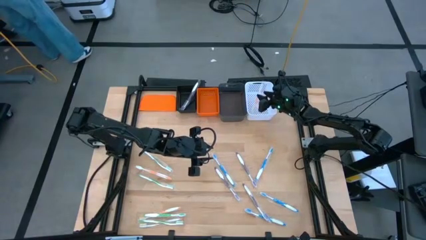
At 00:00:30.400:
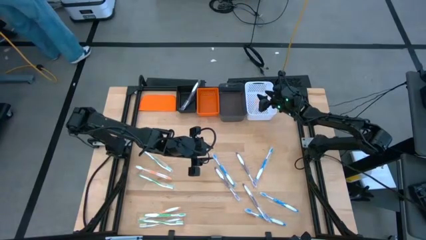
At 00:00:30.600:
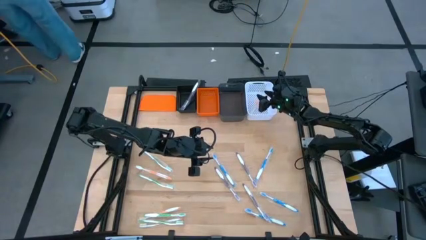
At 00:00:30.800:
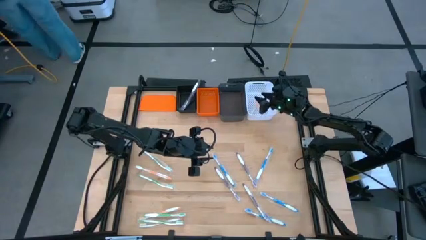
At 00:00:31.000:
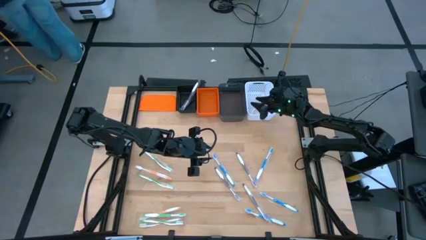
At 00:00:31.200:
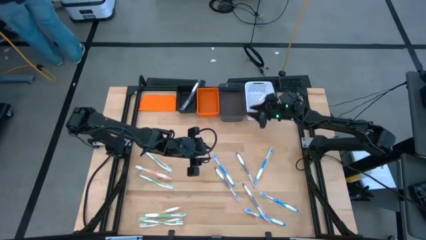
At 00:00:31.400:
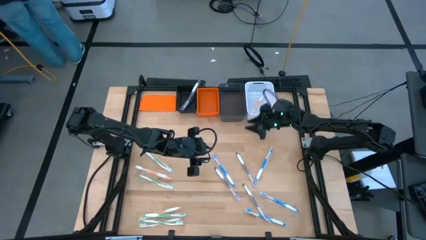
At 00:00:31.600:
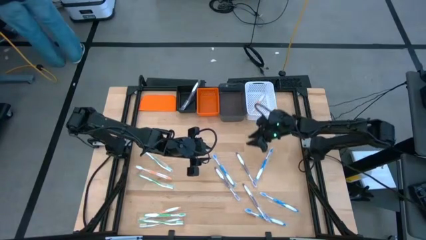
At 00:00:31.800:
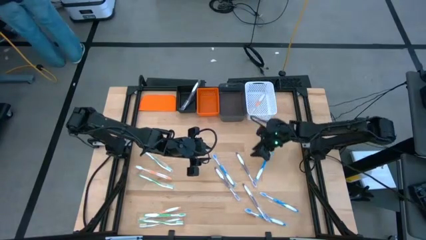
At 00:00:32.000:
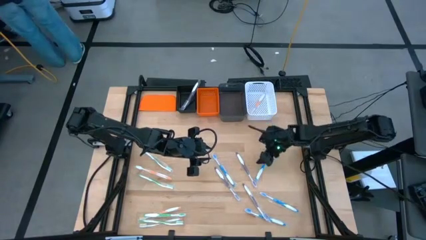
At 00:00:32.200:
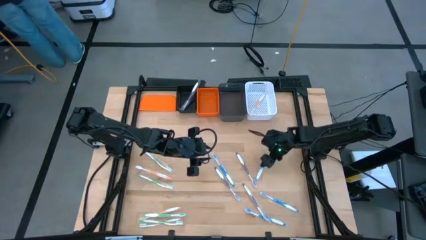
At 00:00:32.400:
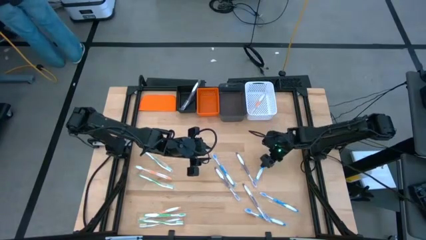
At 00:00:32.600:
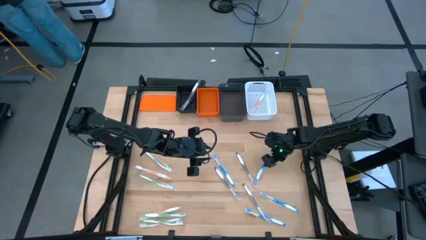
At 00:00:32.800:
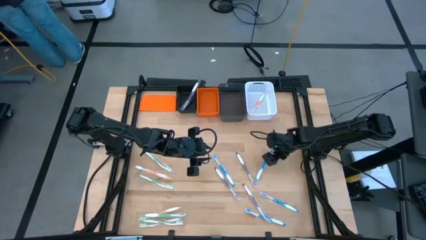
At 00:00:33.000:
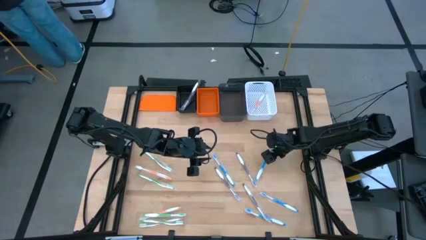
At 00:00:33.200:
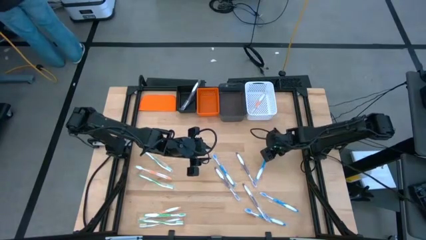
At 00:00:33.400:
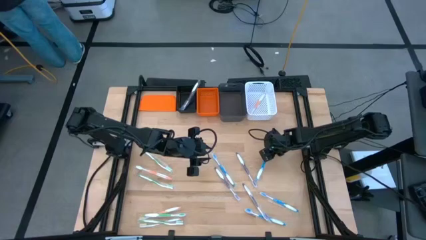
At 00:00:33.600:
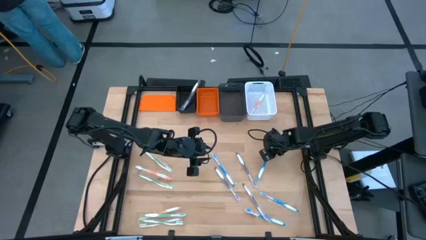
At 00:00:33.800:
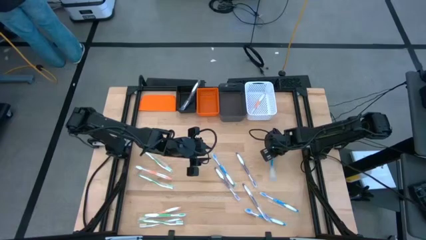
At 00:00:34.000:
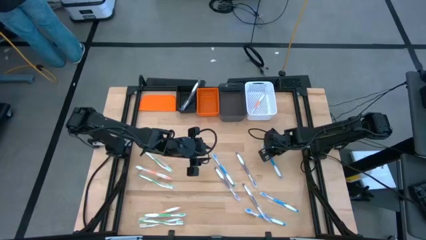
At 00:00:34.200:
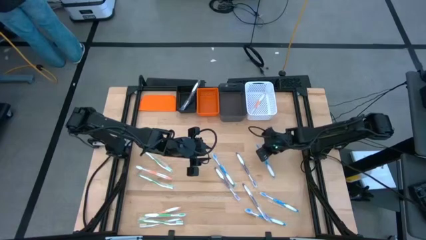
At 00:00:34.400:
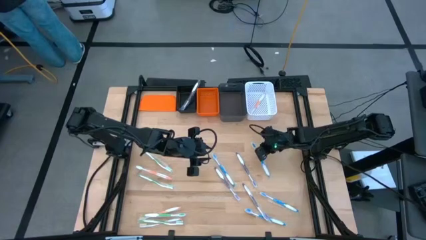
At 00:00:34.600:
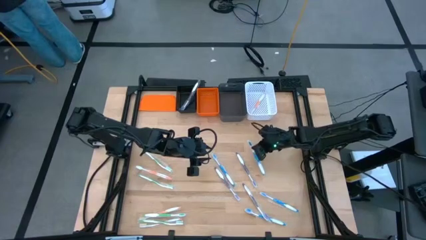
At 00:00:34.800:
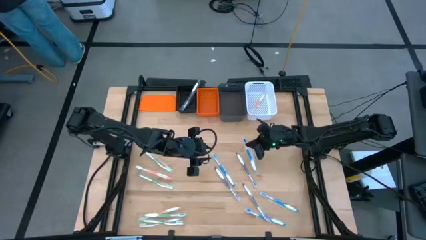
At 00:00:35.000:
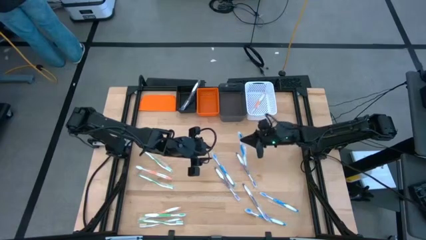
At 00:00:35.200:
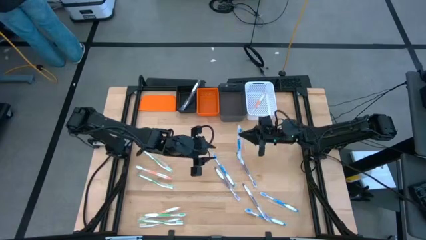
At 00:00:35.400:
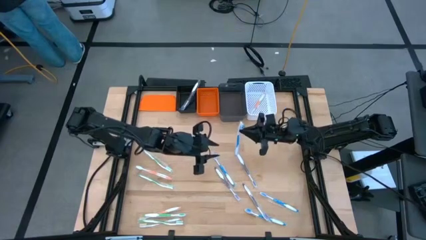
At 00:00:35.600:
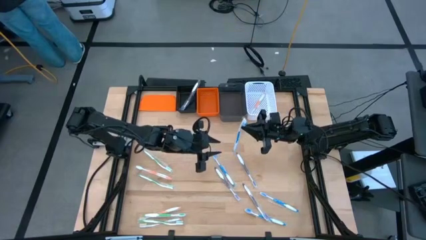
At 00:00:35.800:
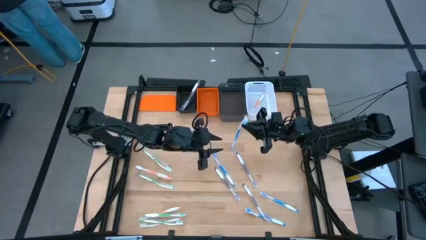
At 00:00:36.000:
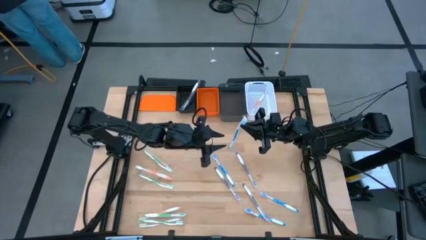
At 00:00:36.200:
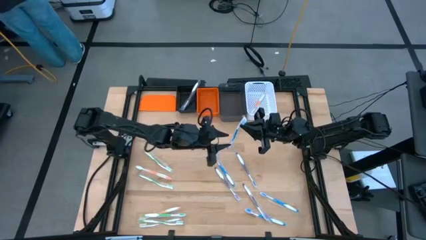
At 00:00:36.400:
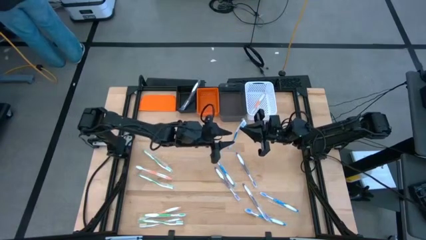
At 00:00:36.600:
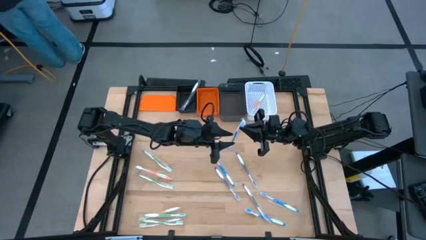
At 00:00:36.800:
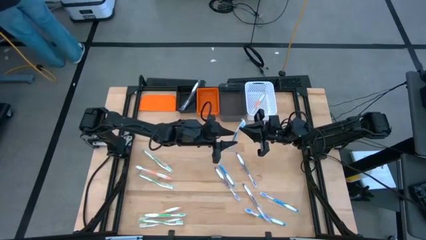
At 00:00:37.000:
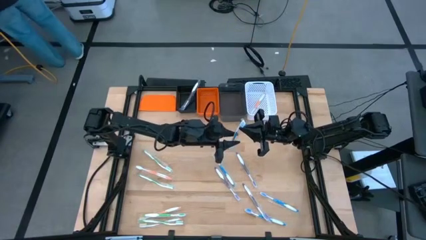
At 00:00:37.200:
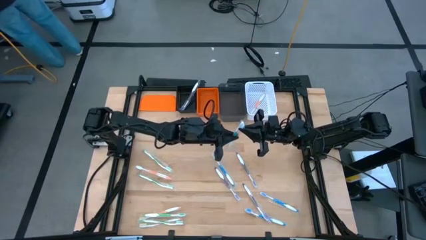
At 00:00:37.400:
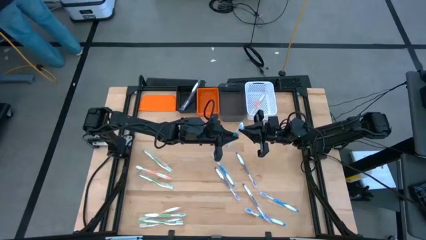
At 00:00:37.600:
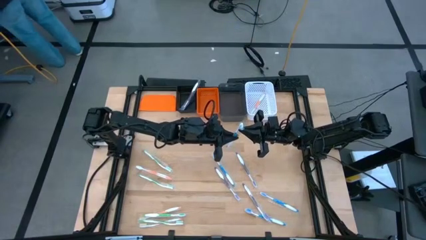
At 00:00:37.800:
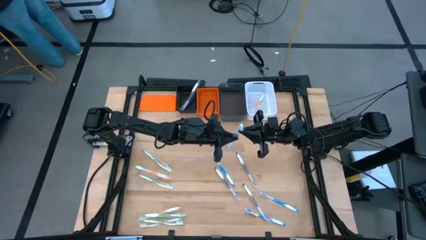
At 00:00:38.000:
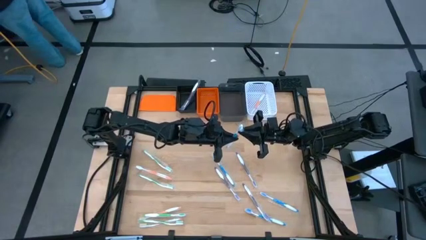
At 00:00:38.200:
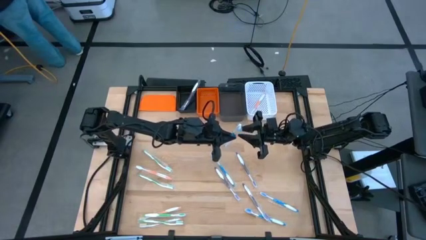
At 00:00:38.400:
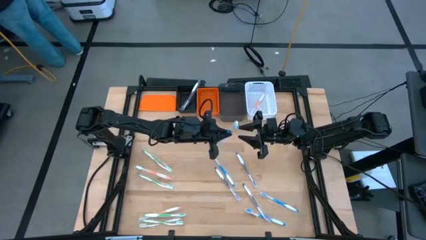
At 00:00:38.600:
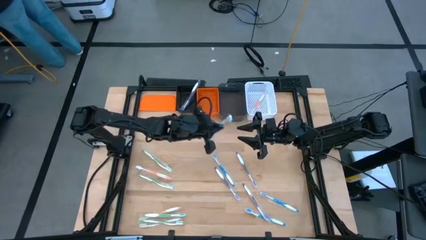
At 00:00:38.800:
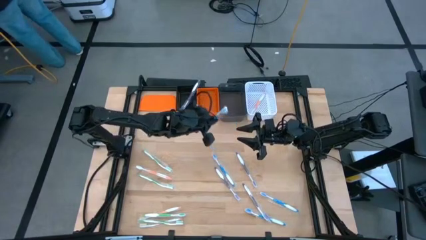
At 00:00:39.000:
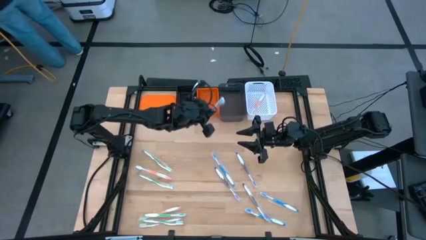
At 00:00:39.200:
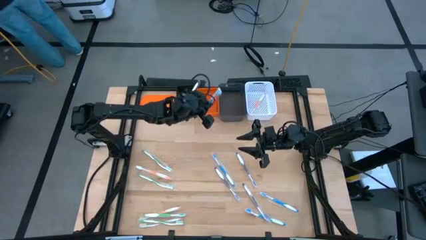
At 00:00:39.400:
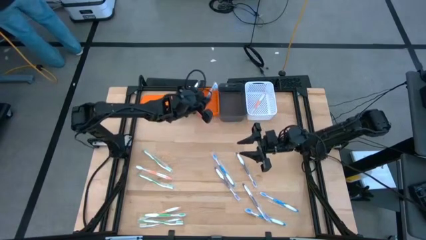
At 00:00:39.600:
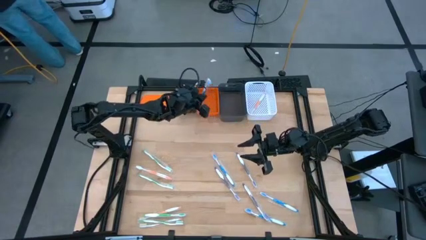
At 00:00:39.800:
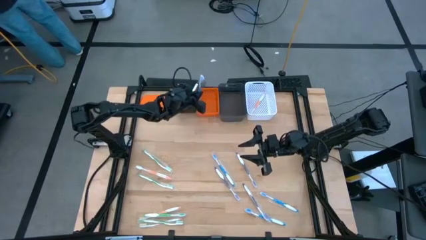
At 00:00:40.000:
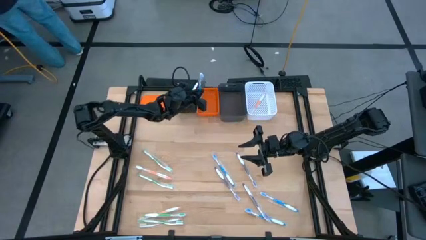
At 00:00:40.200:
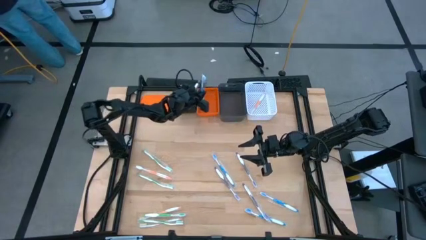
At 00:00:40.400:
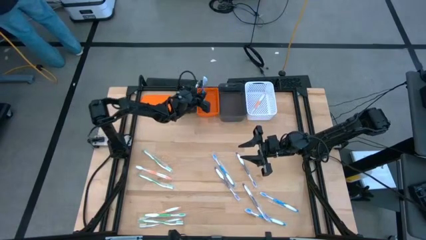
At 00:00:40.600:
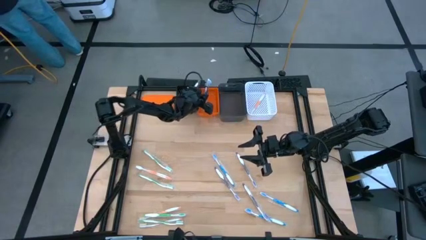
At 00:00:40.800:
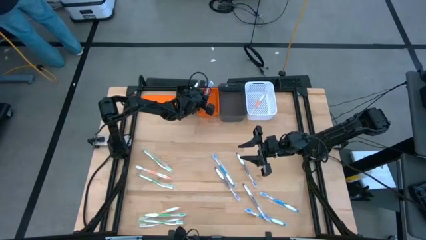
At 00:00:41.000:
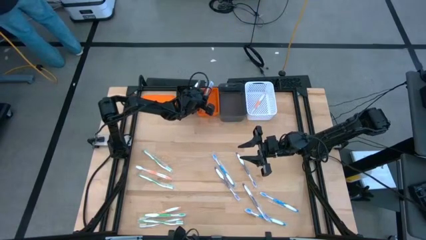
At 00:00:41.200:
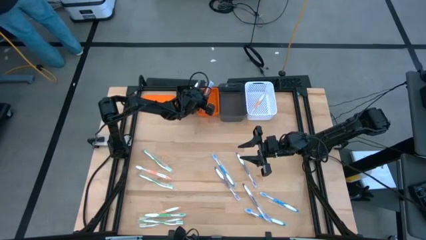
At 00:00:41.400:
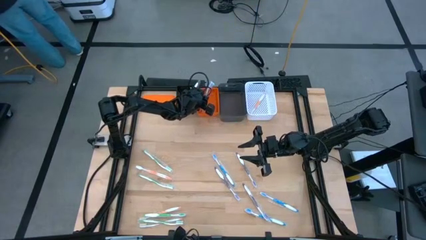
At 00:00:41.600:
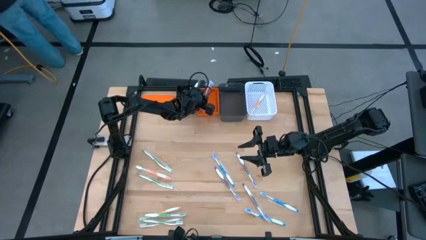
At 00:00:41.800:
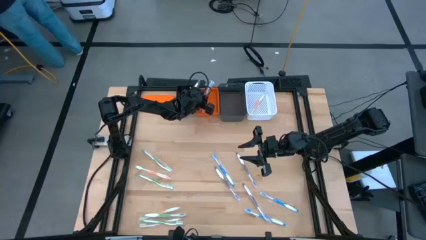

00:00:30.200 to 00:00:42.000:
Task: Pick & Place Toothbrushes
Put the blue toothbrush into the orange bin

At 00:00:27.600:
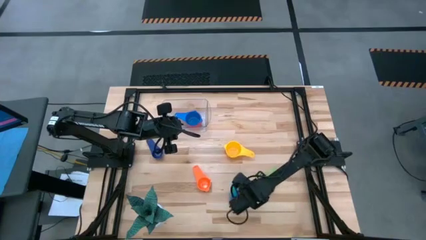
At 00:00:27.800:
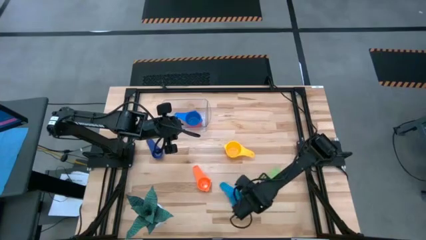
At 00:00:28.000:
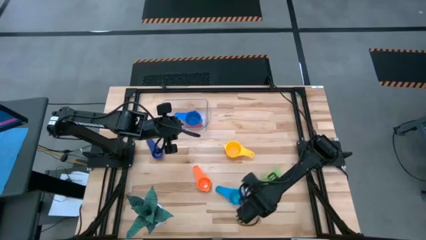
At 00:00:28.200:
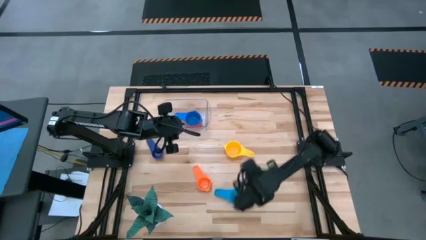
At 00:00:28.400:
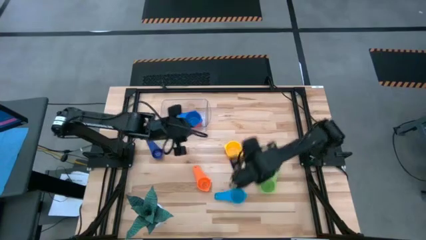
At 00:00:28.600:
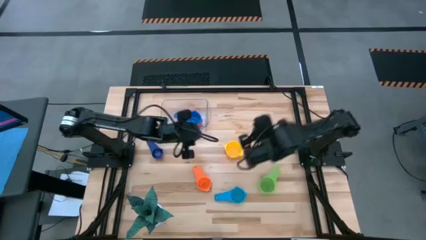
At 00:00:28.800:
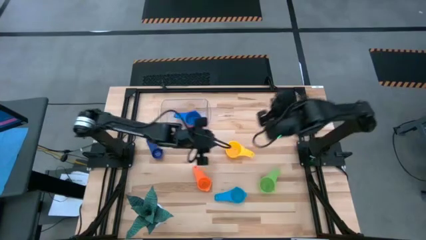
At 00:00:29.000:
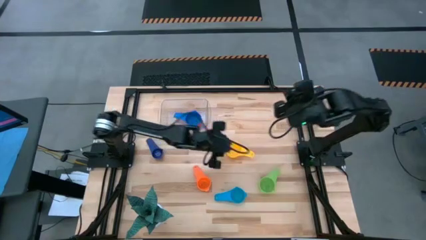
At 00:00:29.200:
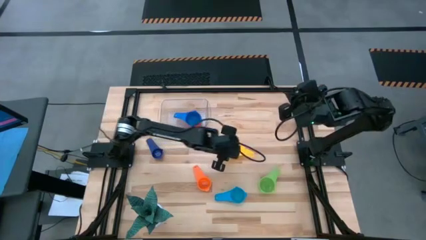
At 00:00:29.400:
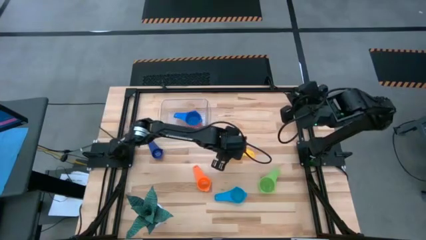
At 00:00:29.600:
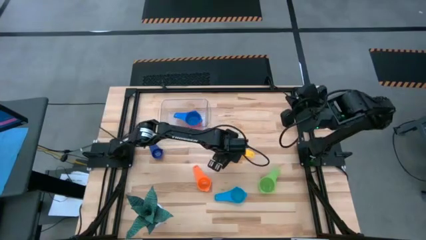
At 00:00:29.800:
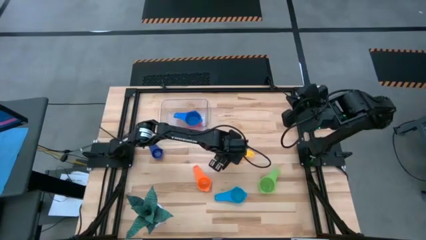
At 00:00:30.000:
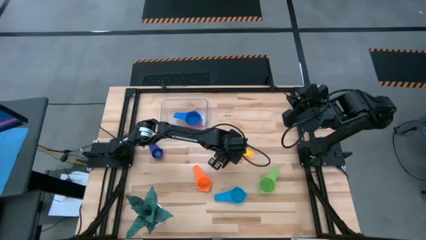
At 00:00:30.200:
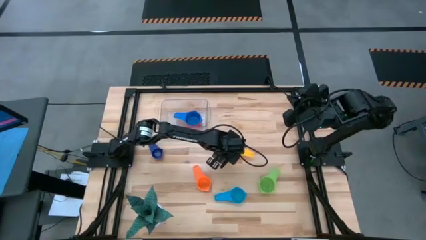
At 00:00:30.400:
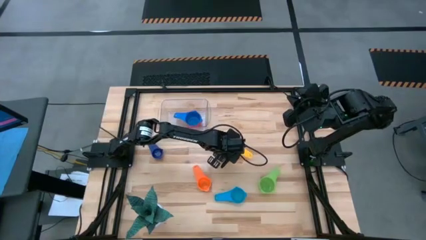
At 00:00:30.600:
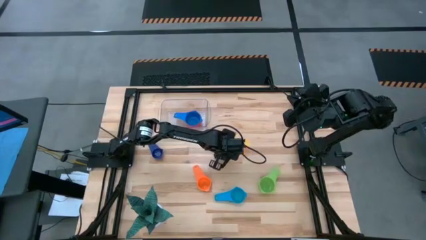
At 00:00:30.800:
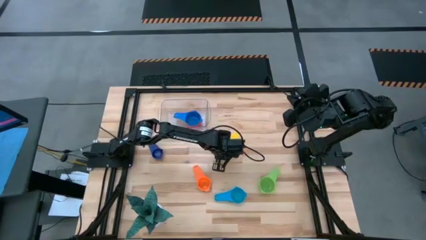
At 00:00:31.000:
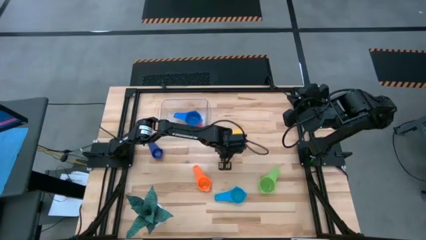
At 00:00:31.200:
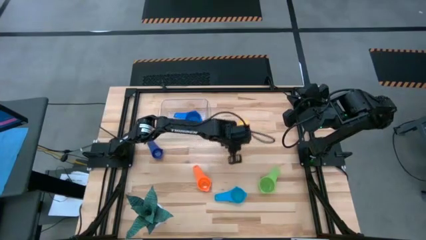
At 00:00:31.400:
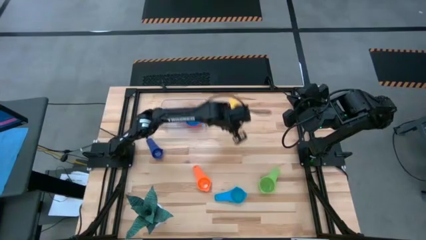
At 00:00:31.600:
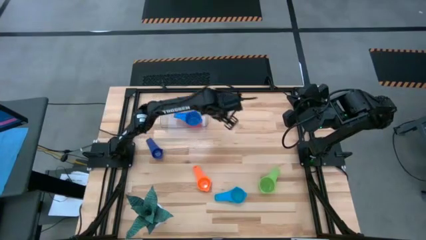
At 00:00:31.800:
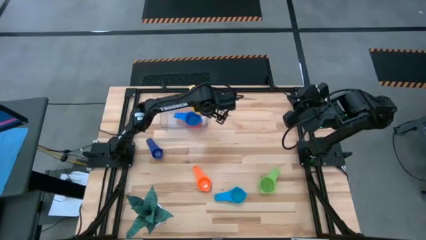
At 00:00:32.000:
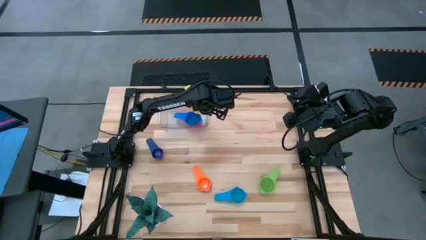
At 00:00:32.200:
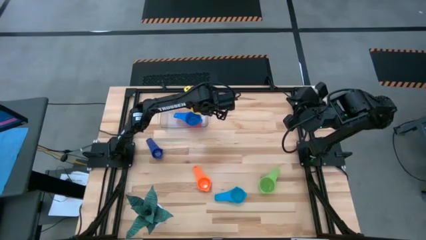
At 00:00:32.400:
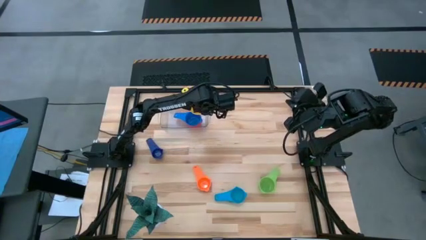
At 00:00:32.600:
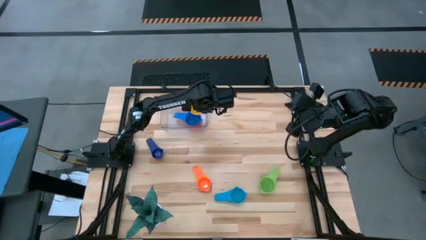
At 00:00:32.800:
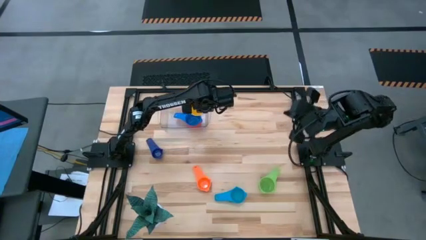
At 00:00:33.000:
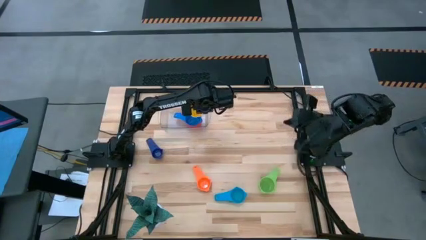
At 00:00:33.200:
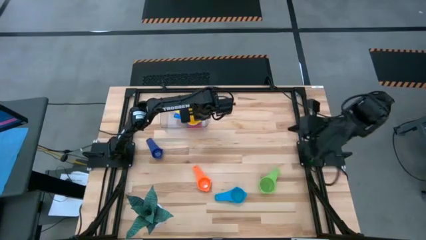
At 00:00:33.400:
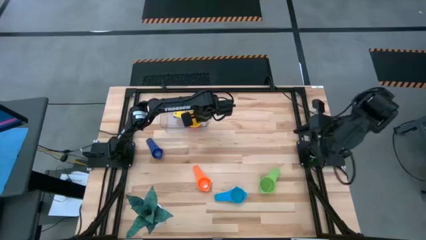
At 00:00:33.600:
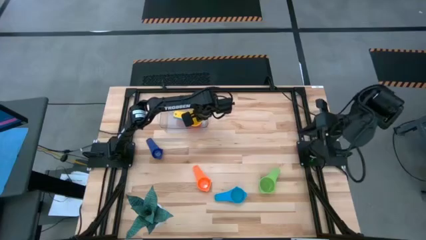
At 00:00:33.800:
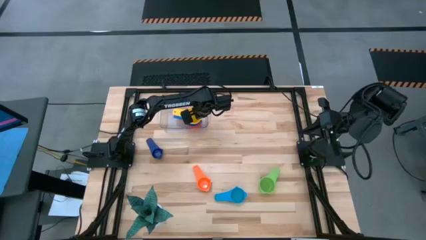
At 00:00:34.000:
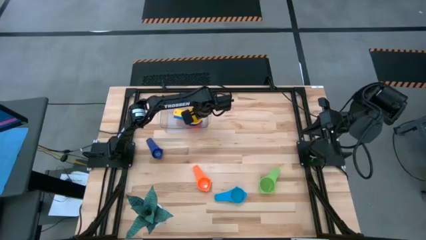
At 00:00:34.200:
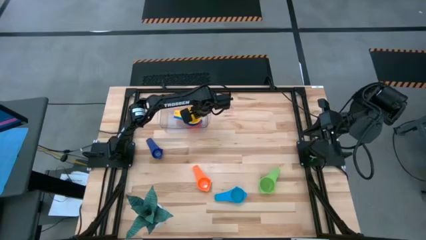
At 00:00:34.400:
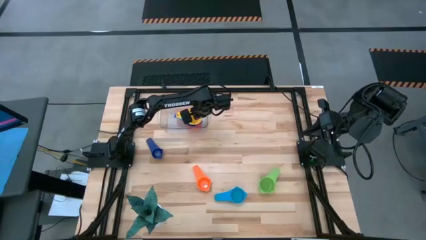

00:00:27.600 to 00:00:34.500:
Task: Nest measuring cups in basket
Stack the yellow measuring cup on top of the blue measuring cup into the transparent bin
